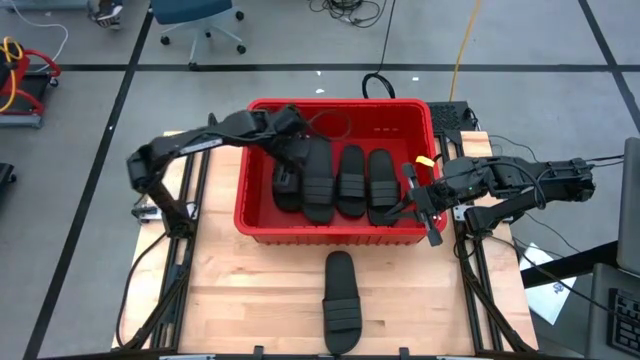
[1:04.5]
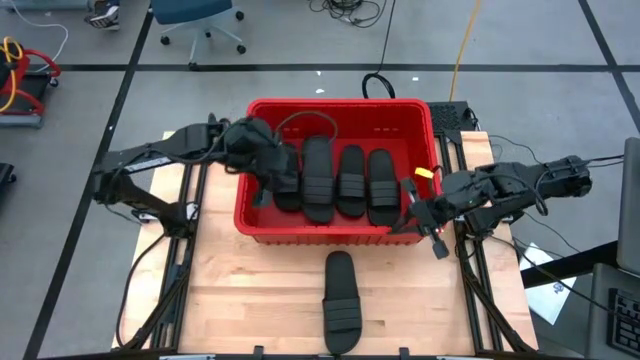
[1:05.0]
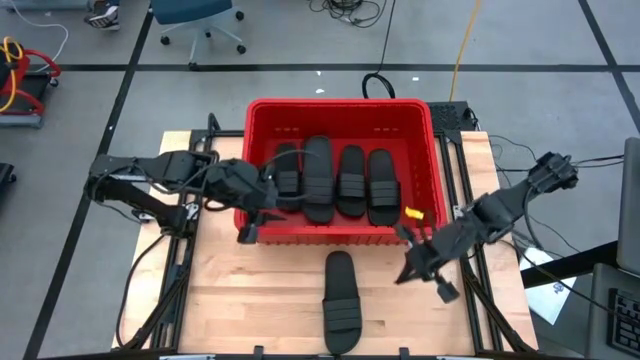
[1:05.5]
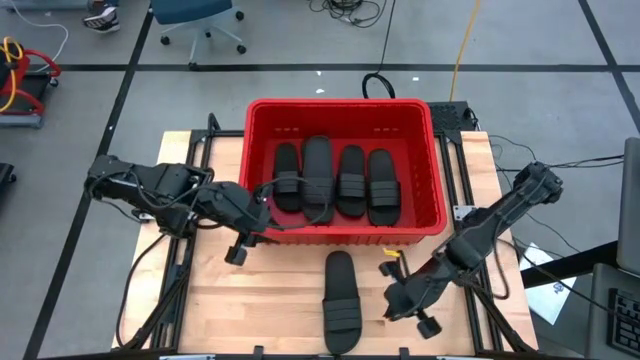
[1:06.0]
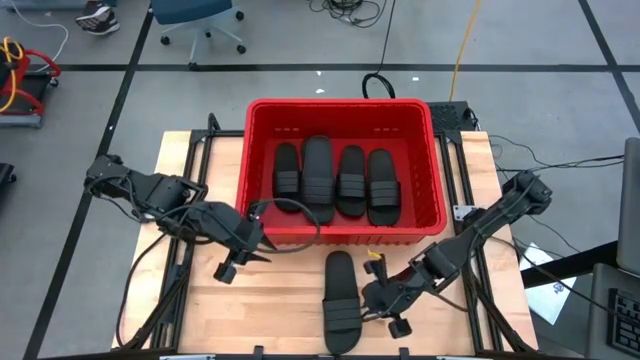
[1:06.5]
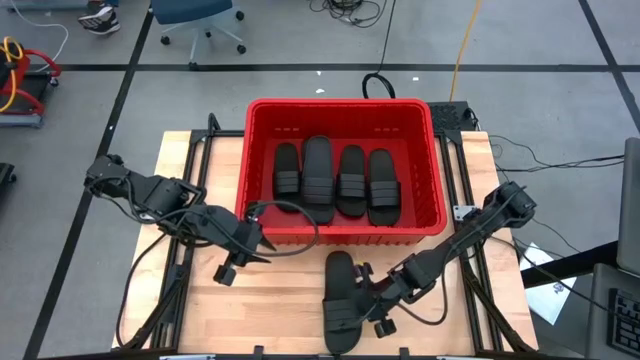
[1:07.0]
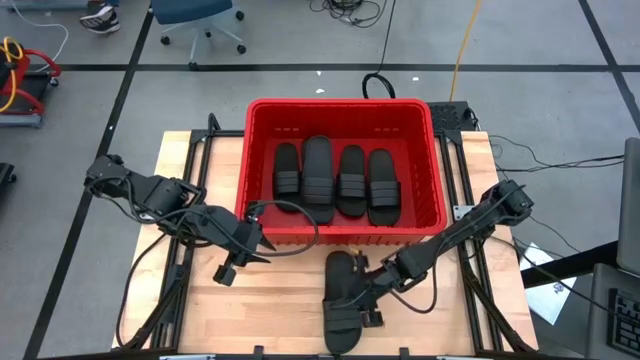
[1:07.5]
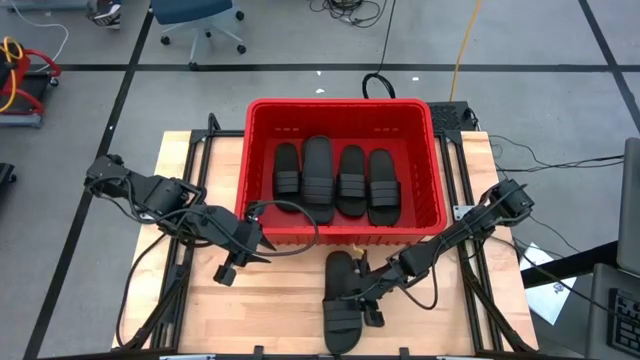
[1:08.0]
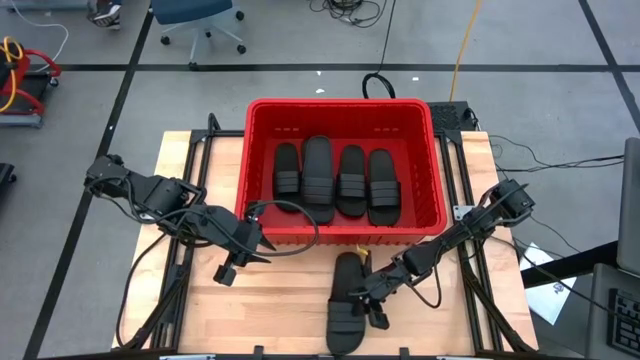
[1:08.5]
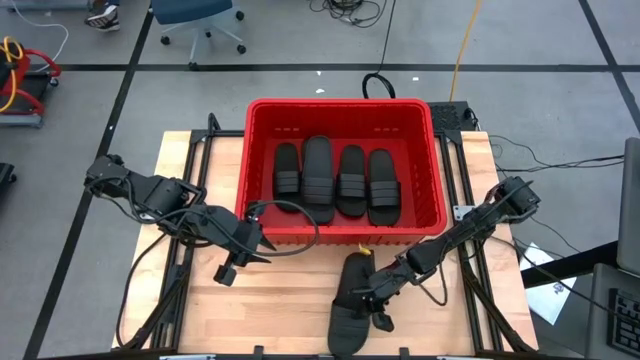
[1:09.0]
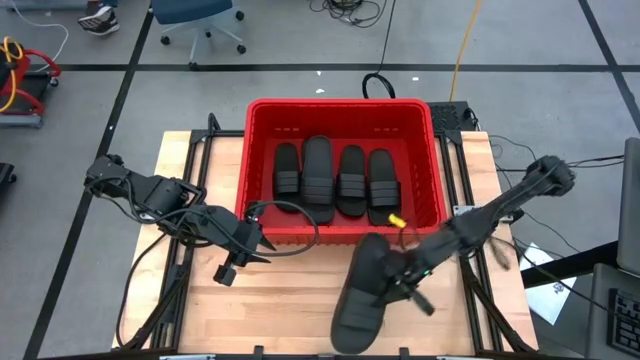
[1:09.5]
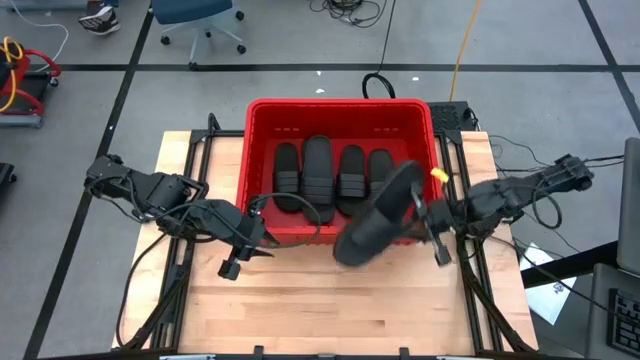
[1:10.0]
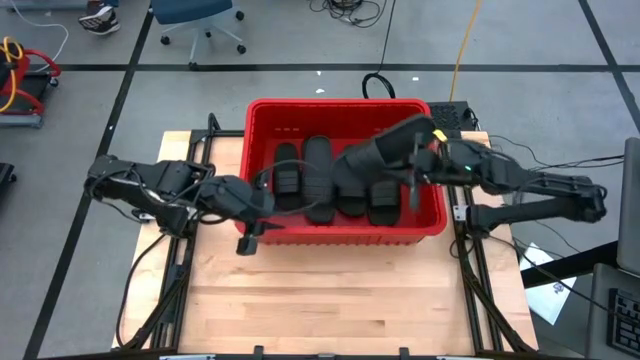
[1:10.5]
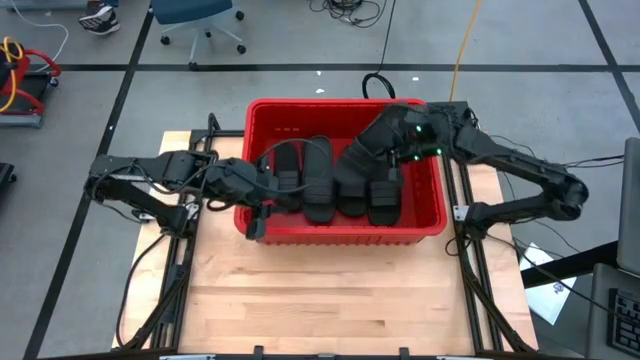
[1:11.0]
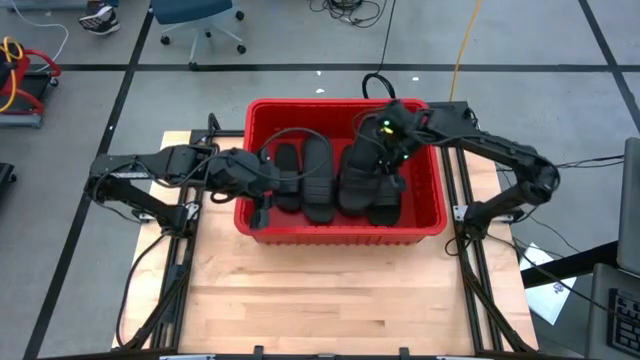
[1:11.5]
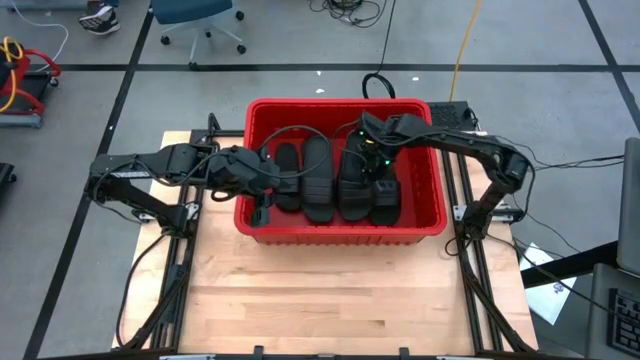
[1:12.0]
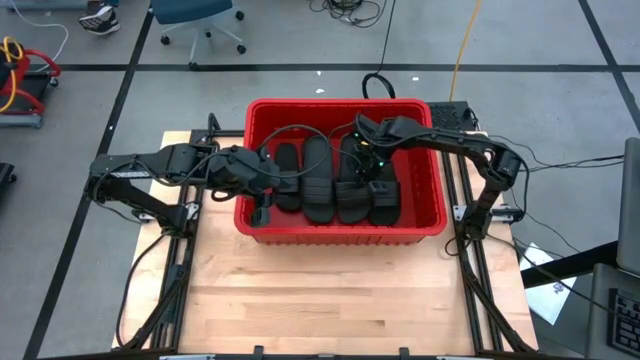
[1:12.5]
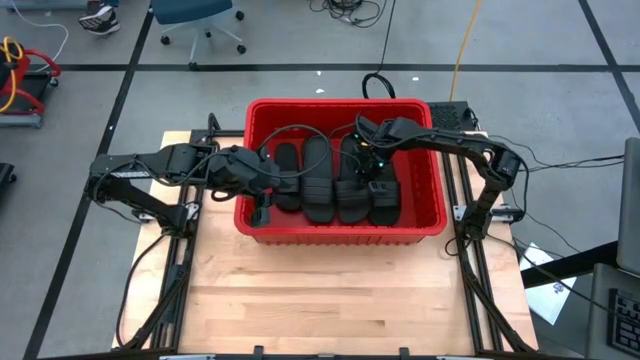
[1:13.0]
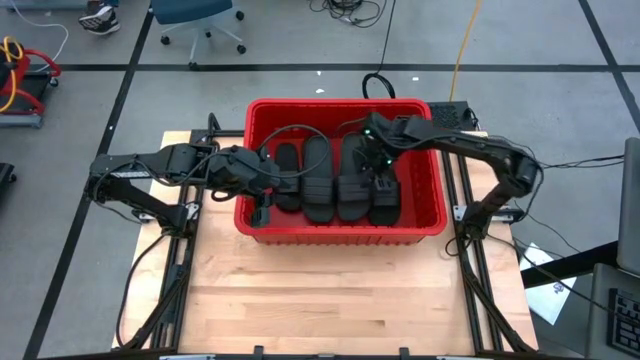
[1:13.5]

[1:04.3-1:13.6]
Task: Pick and place slides into bin
Put the black slide into the red bin

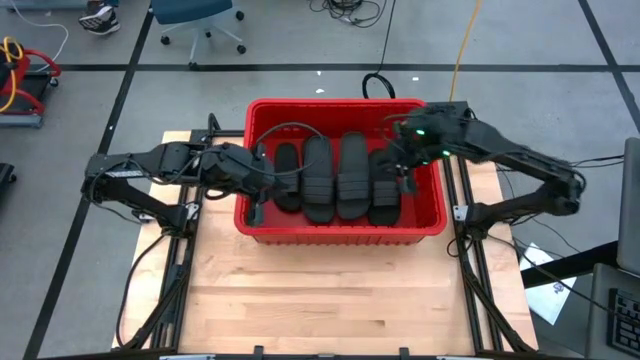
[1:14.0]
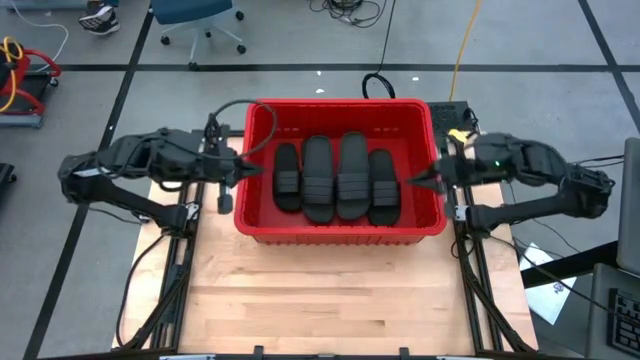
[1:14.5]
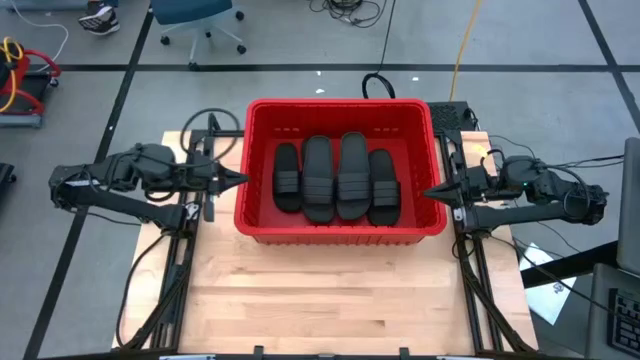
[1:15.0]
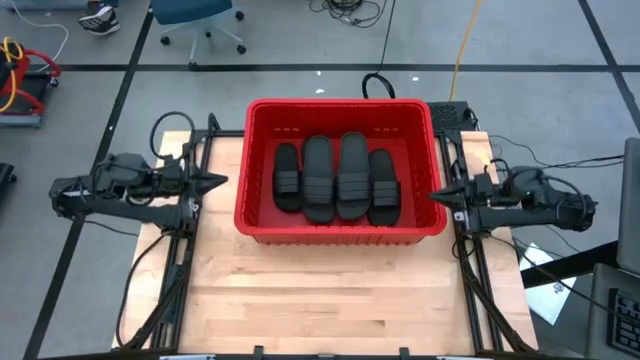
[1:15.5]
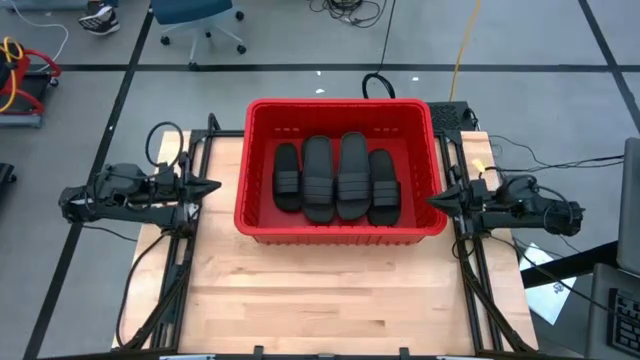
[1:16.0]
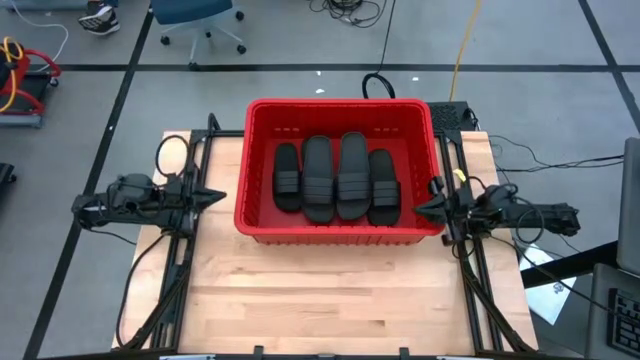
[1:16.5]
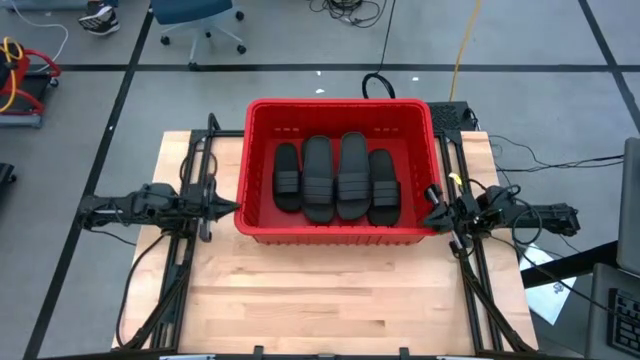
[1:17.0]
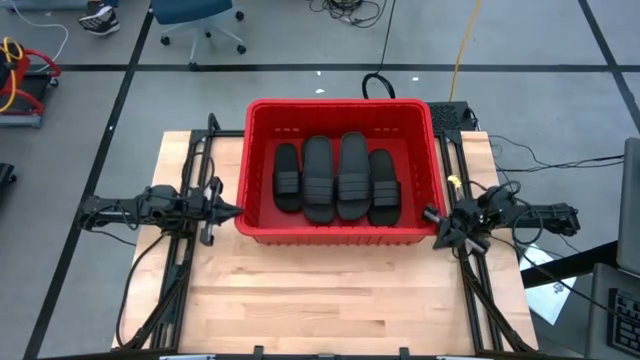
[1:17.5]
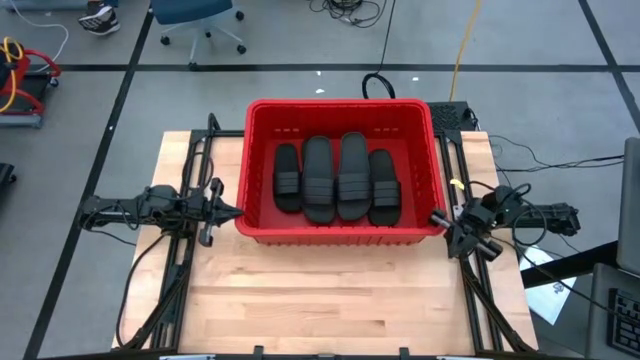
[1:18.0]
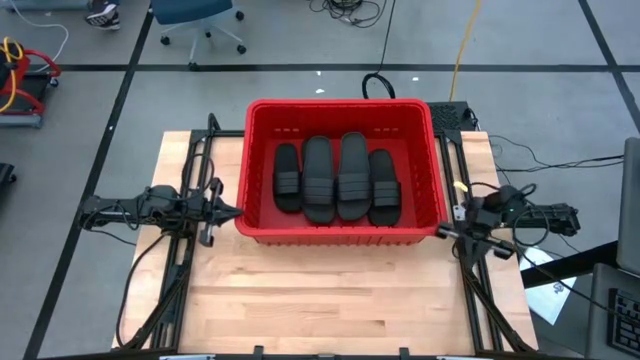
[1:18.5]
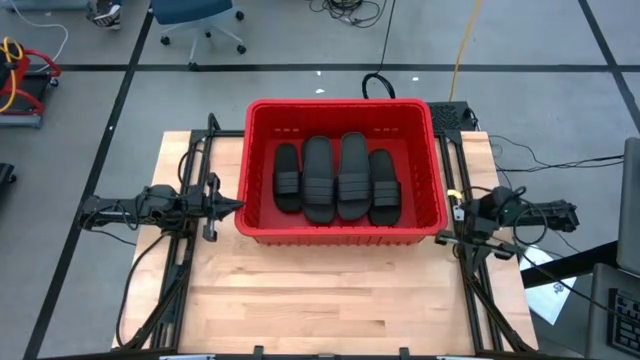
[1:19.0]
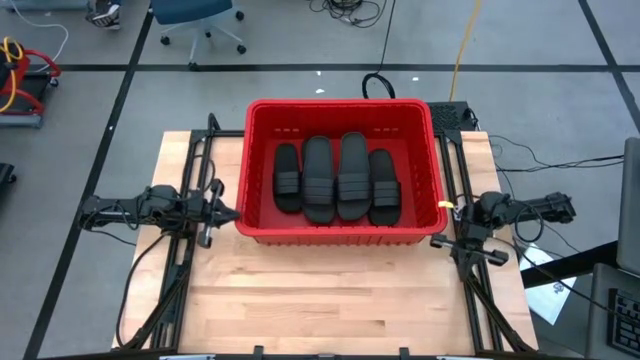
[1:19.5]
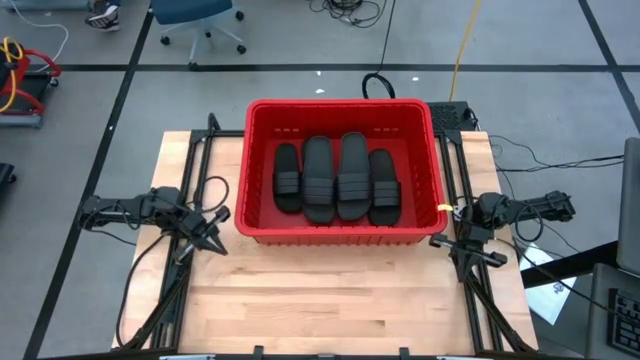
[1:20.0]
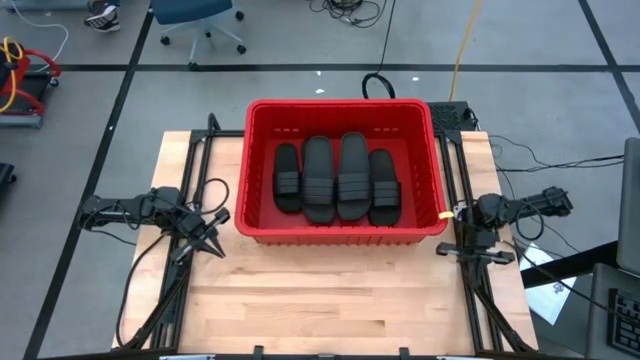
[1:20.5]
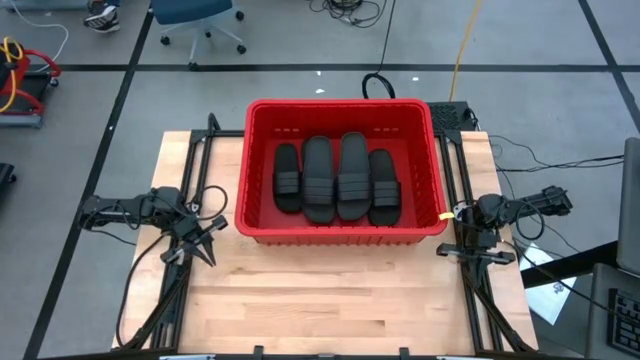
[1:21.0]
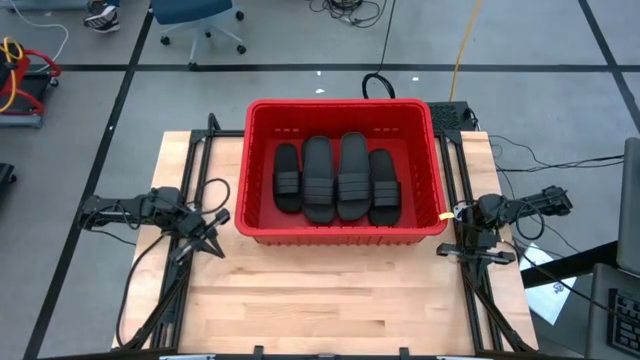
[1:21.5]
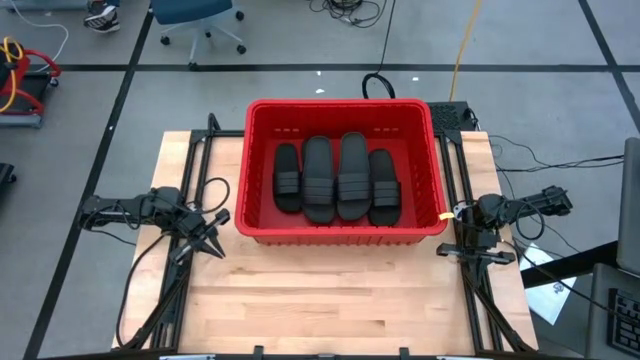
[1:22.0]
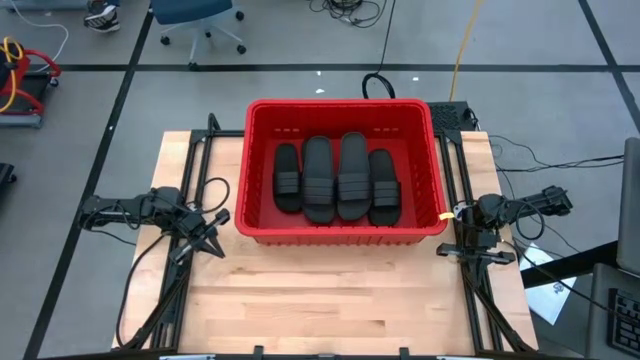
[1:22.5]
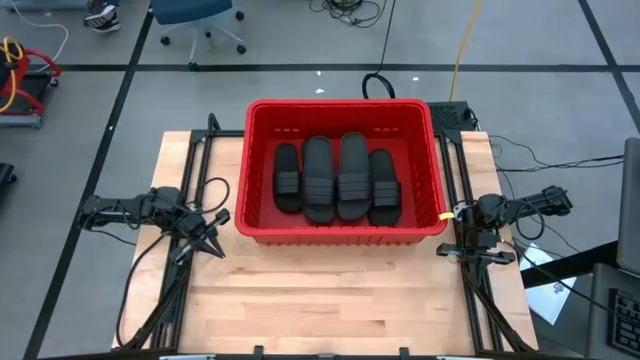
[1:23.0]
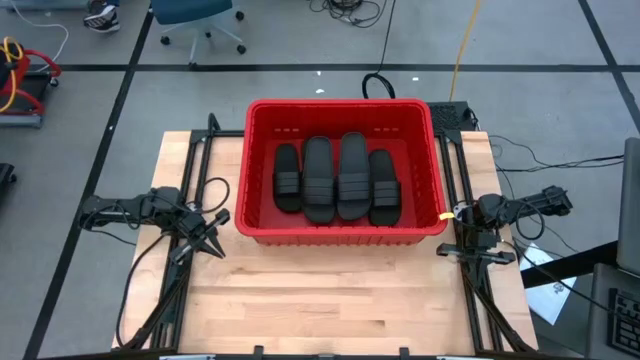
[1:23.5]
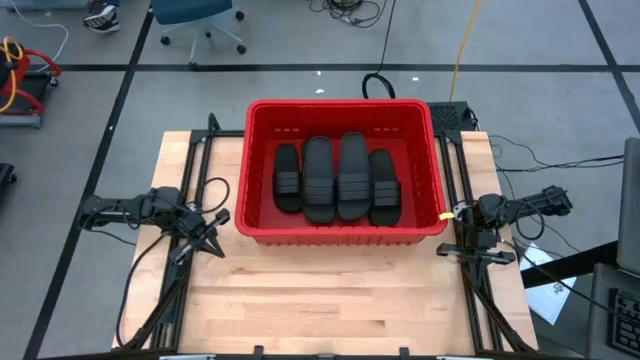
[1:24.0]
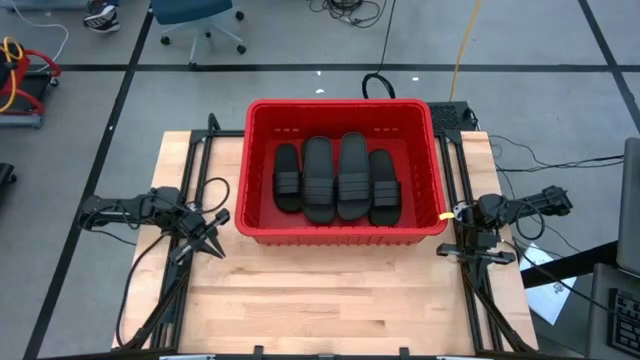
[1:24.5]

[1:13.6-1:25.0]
Return to Home Position
